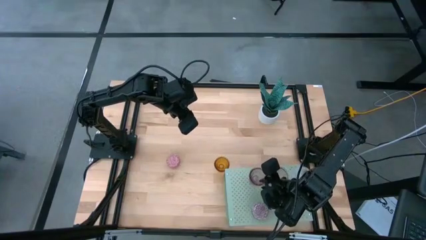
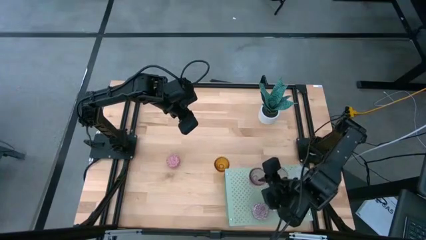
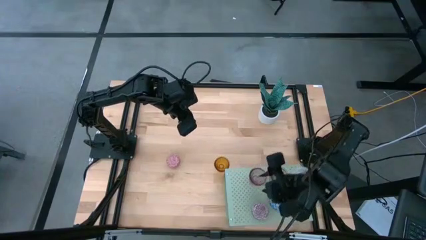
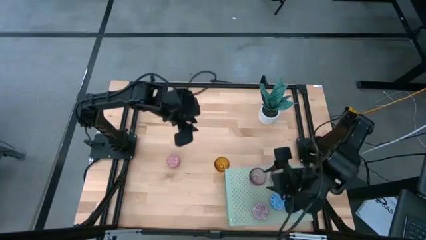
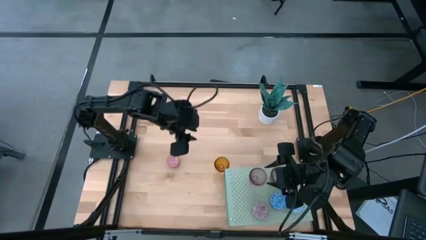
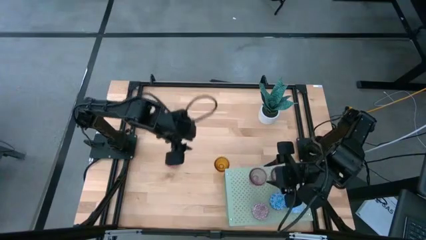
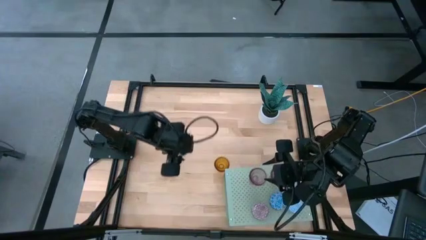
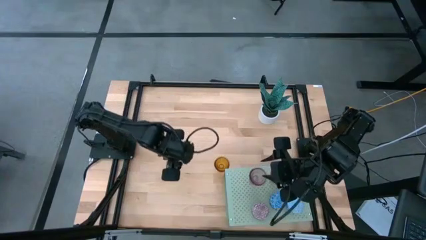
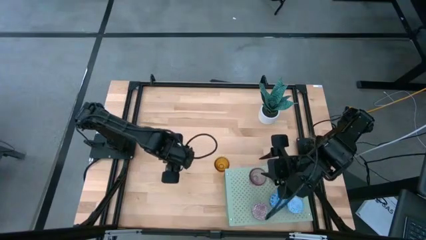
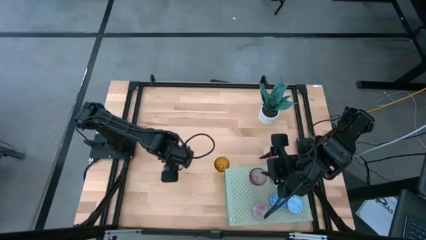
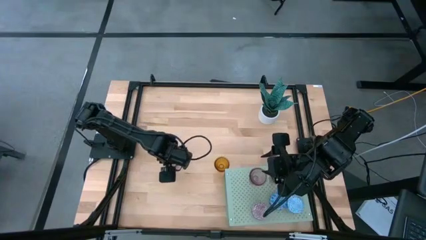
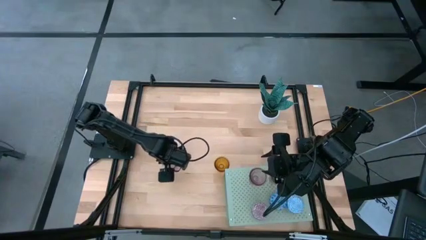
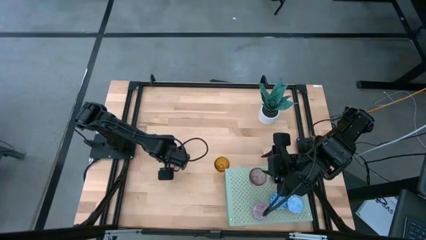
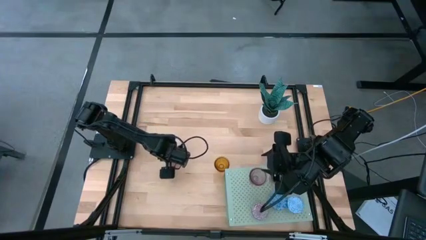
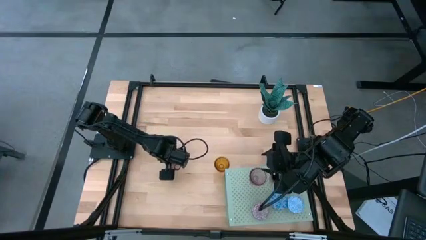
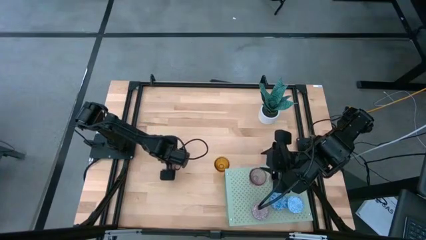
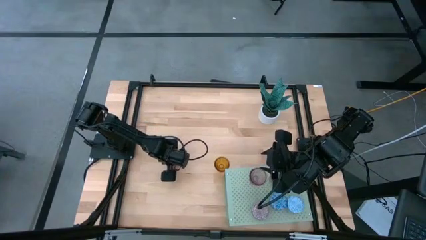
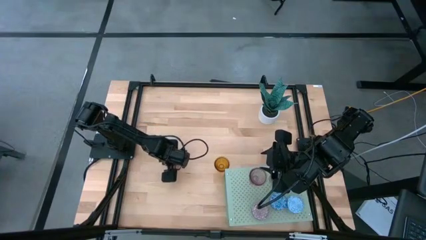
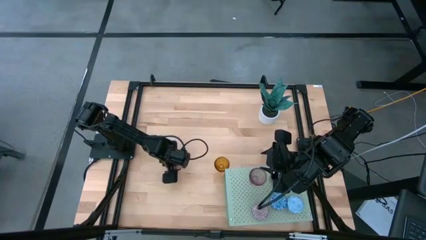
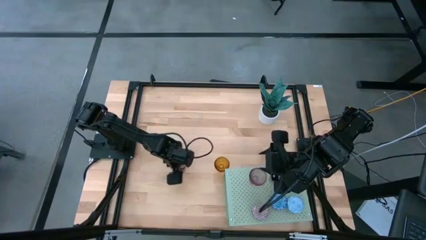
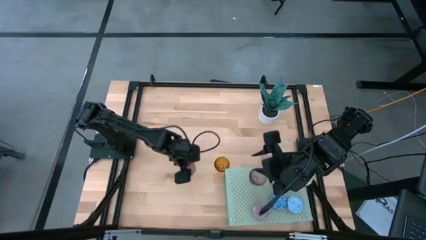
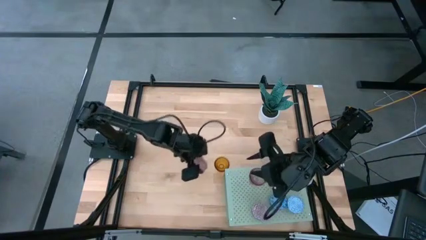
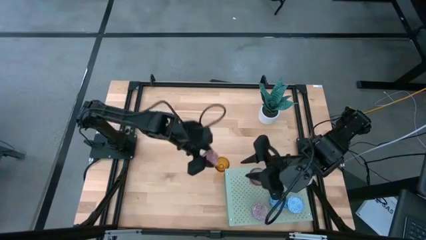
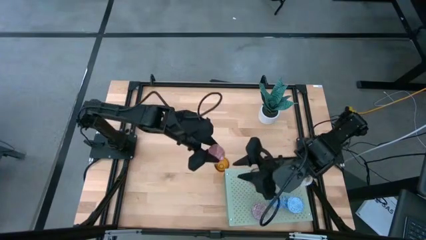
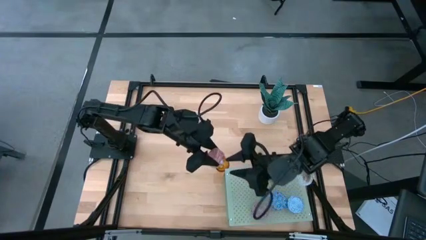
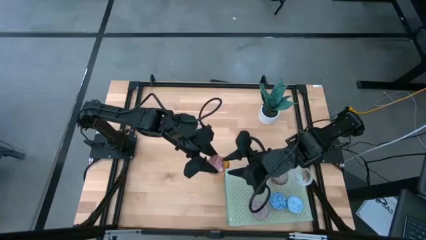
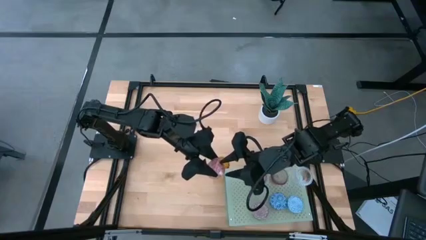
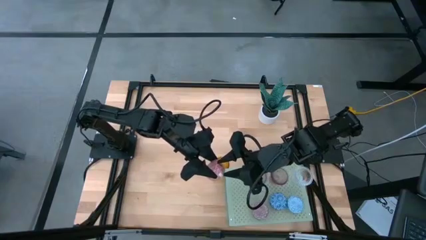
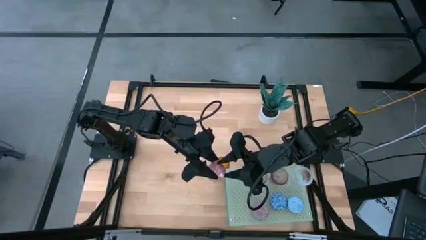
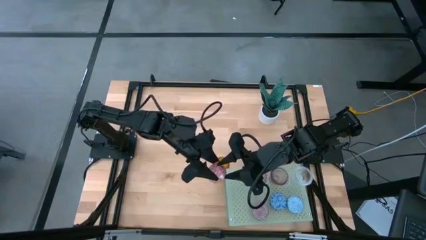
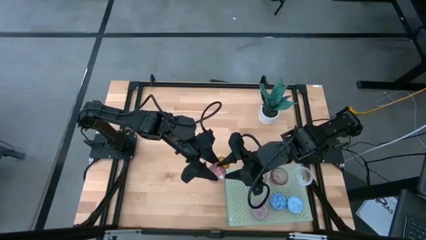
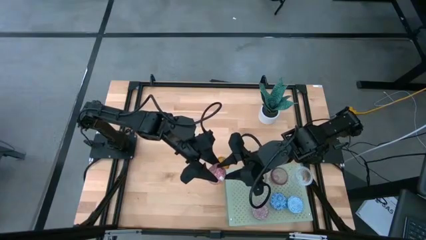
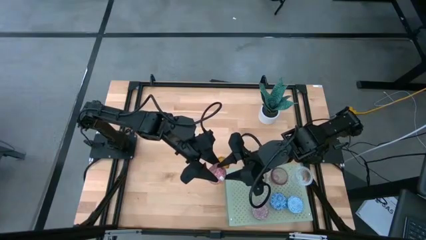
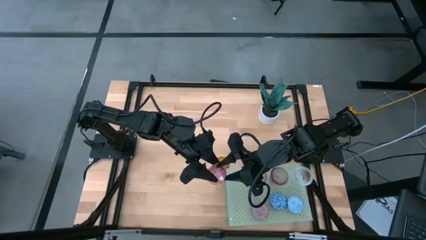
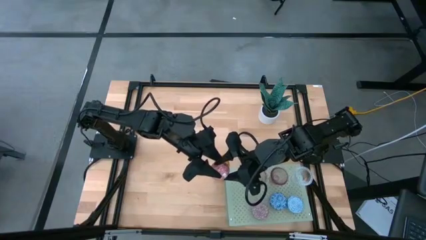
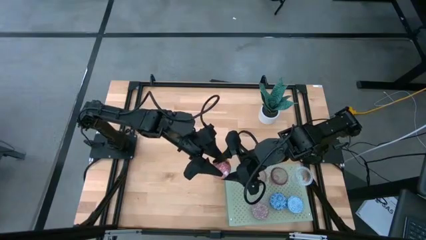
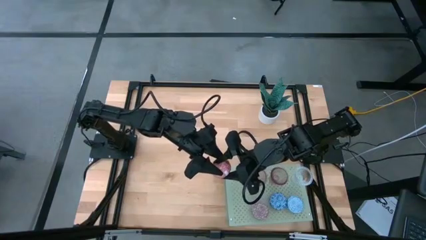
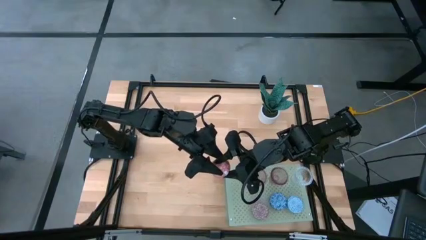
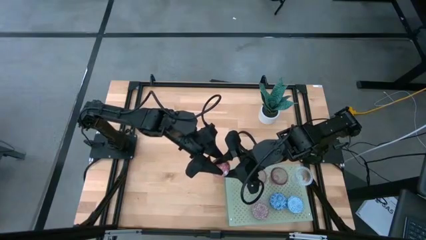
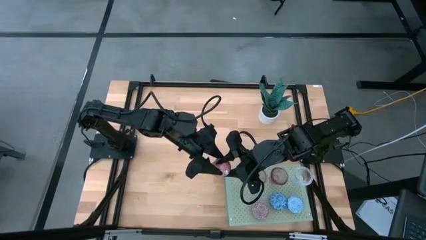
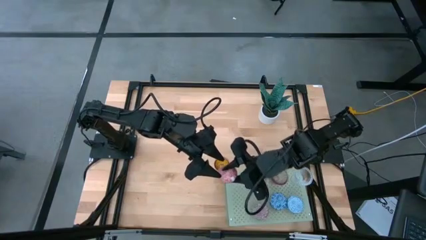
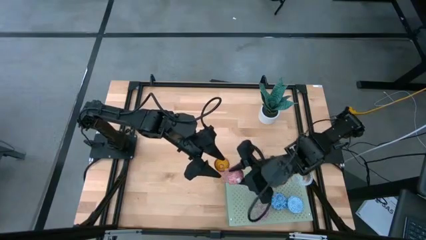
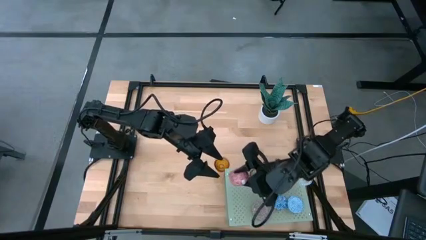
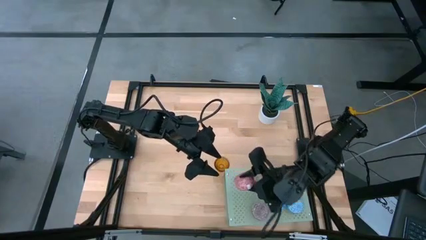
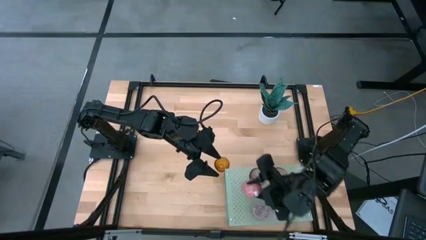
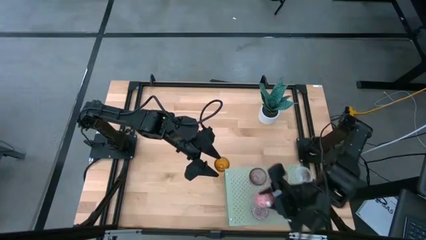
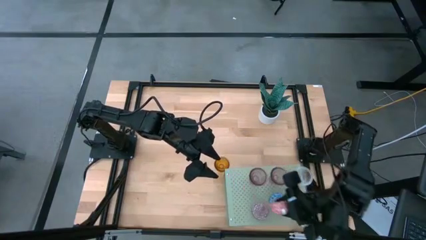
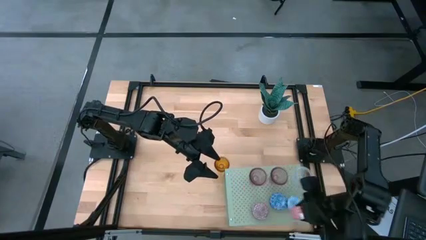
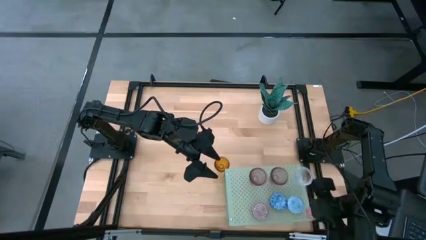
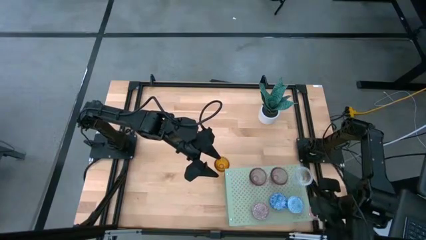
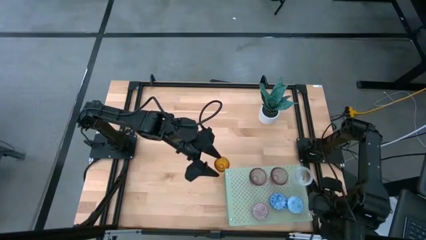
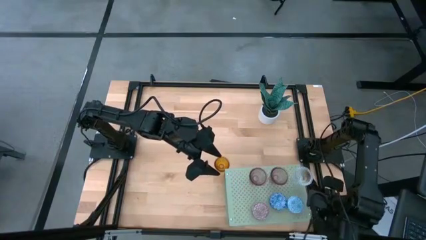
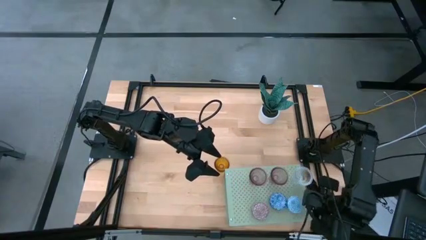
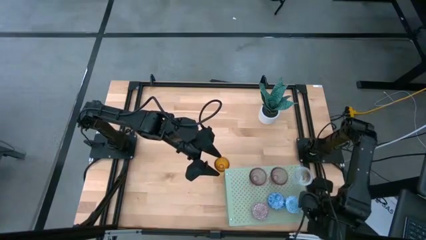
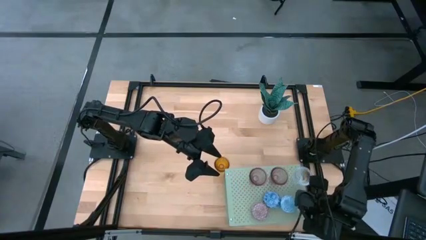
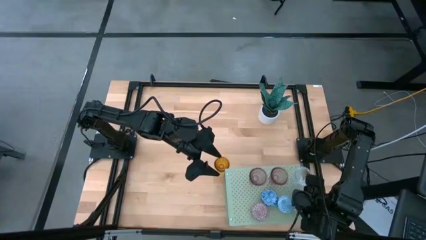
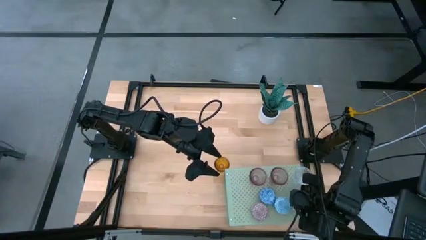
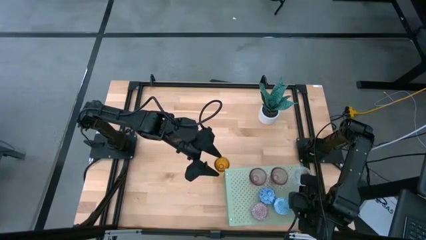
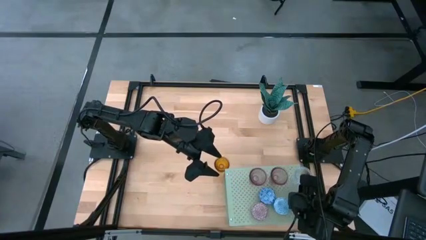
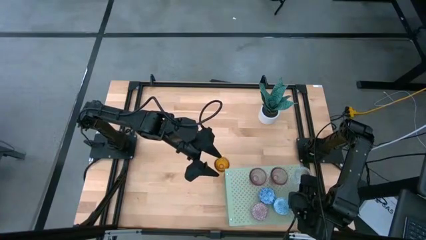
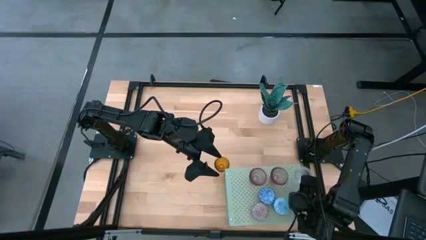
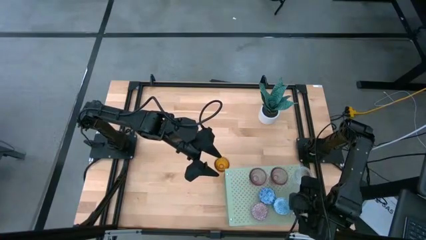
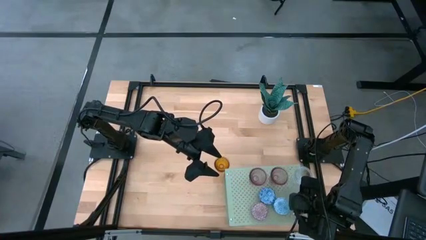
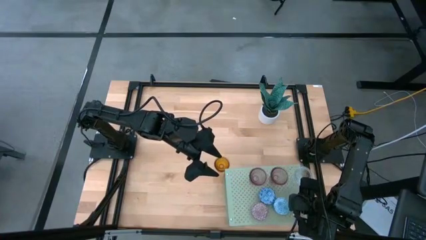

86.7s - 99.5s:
Task: Pick & Place candle stick holders
Put the pink scented candle on the shelf

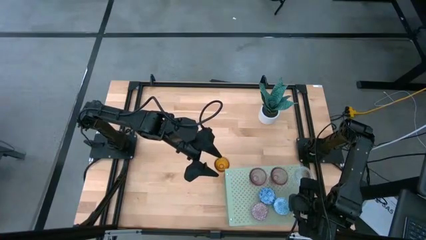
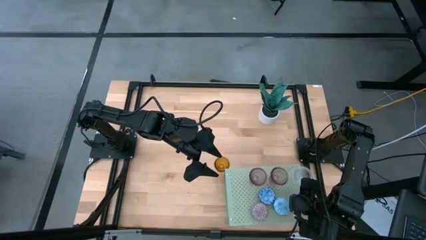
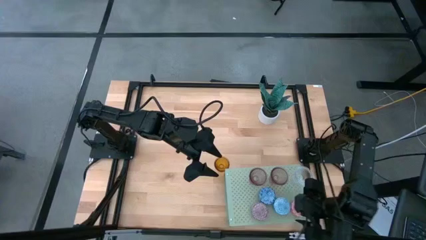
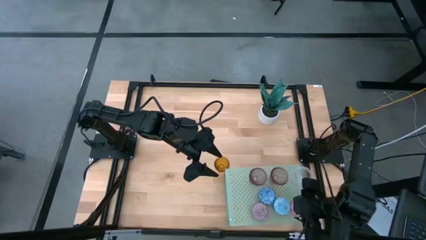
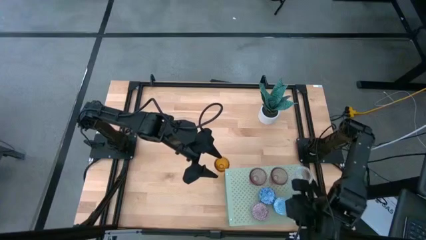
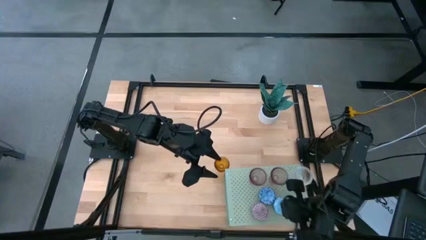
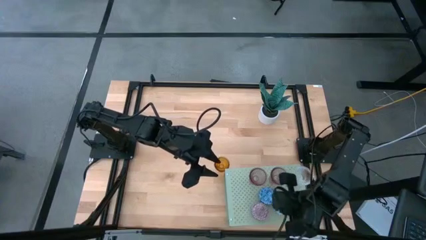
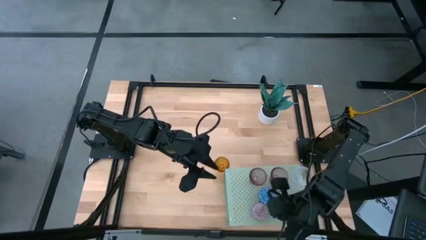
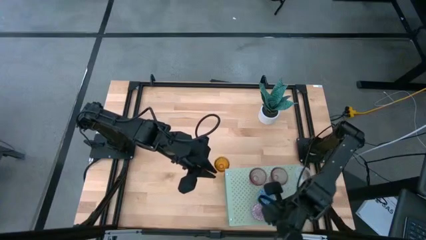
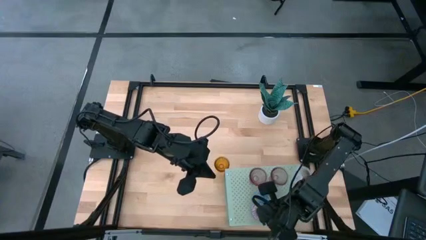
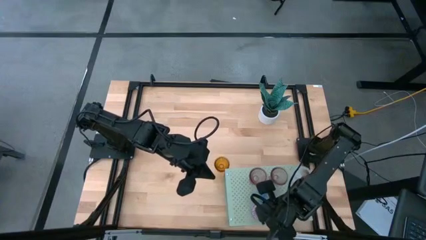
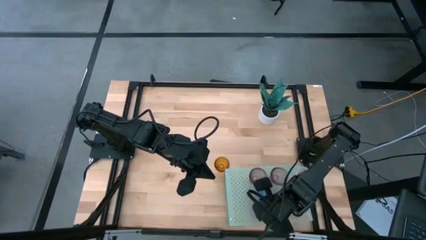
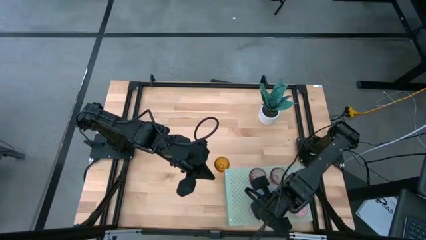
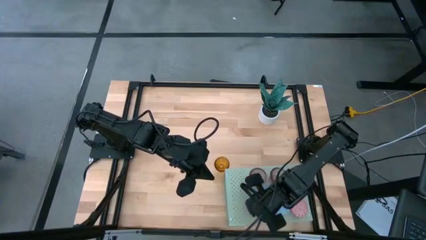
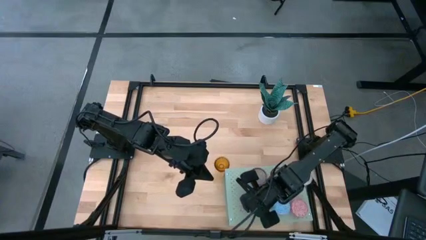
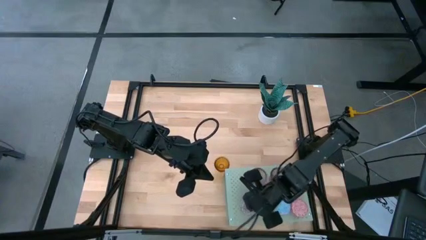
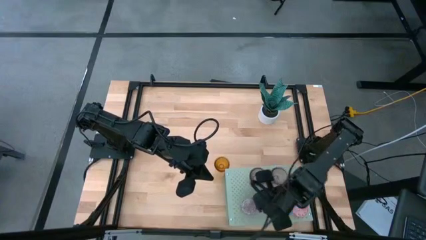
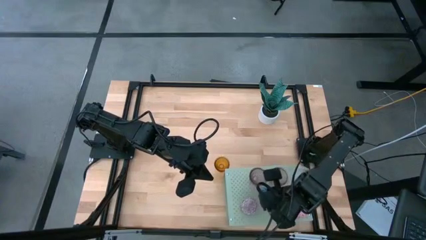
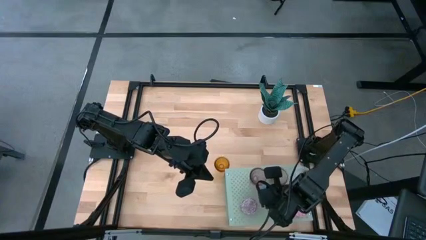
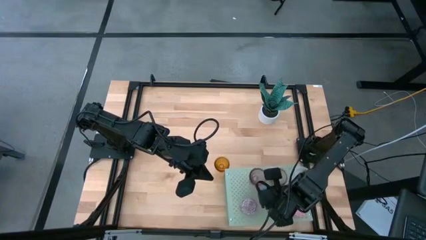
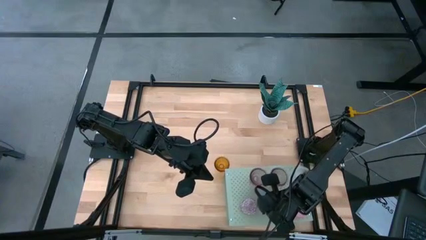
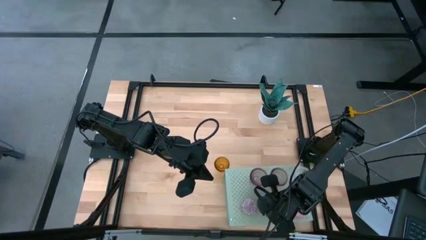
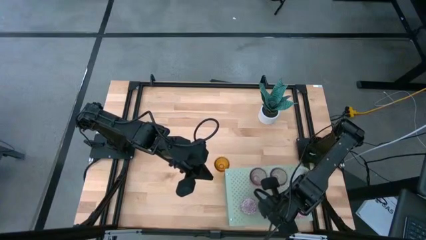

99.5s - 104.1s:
Adjust the scented candles on the shelf
